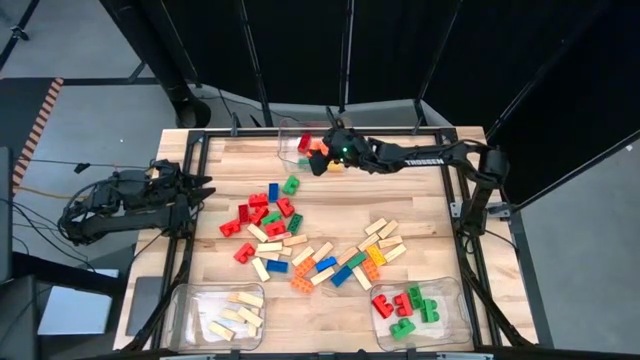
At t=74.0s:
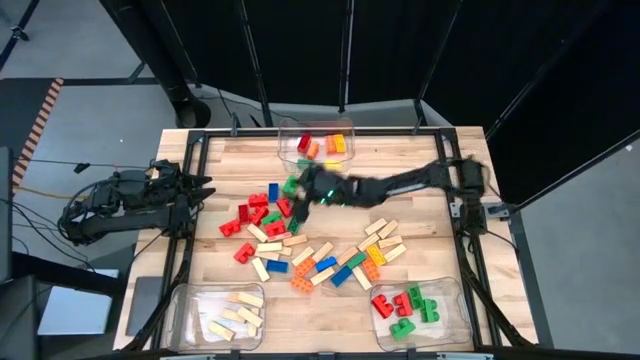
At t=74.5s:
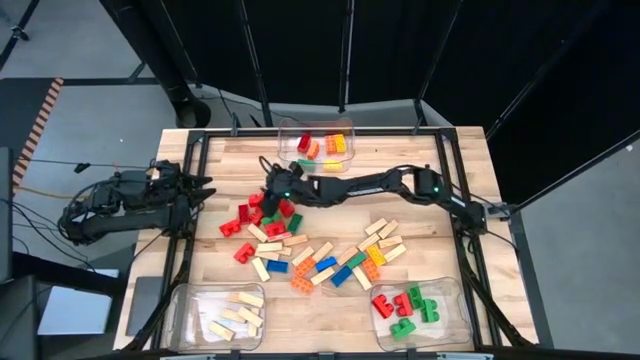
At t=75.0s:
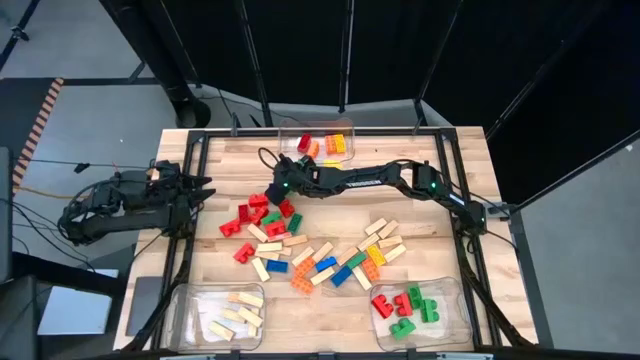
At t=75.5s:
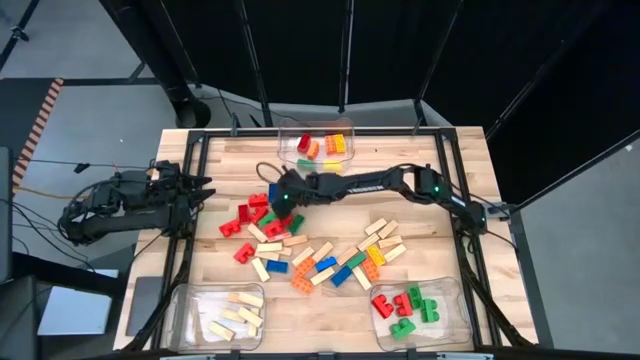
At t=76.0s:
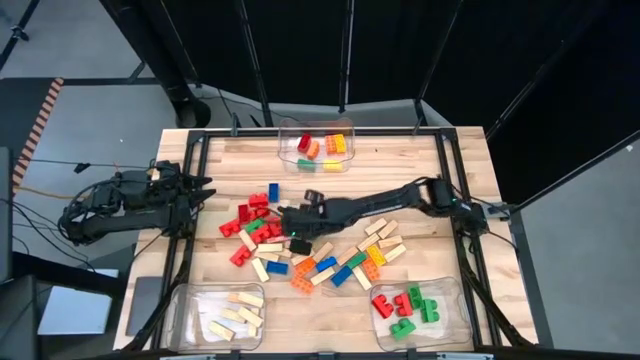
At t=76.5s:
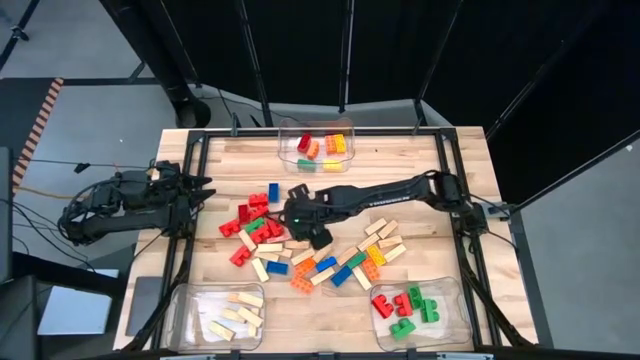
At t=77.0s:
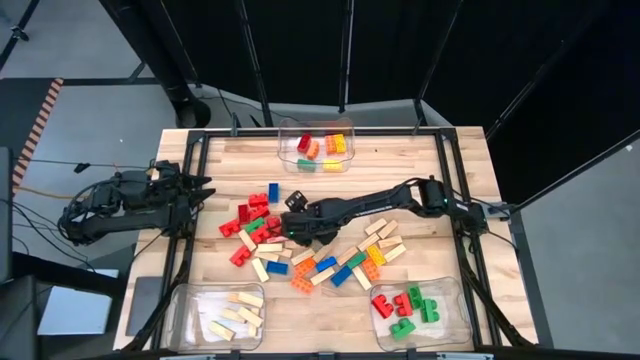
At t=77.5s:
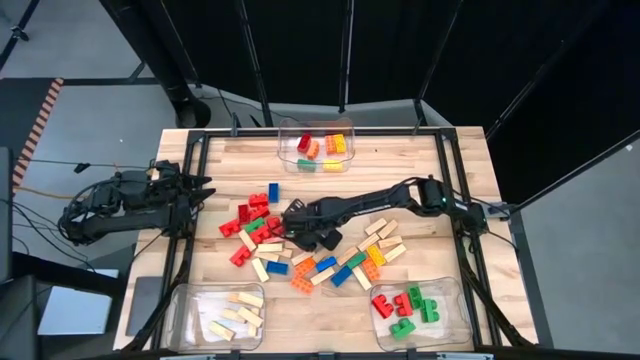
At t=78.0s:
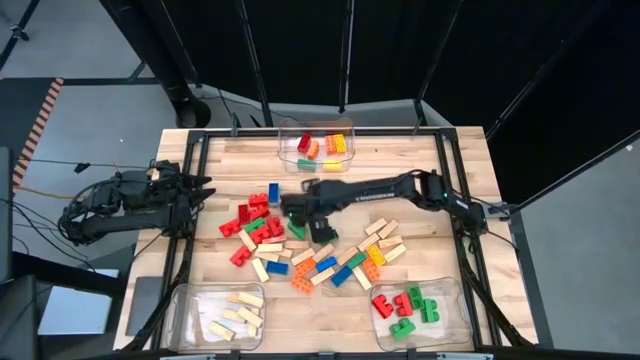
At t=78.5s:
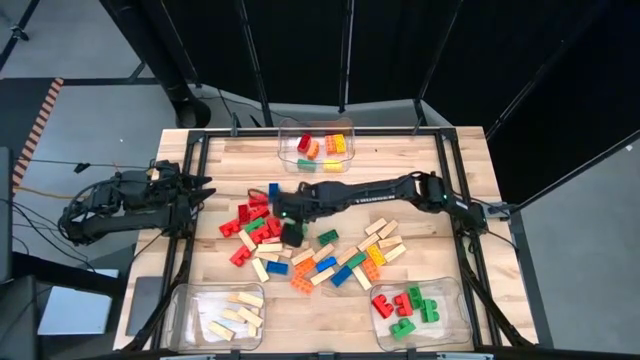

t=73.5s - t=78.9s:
Task: Sort blocks by size
Put the 2-stud green game piece into the bottom right transparent bin

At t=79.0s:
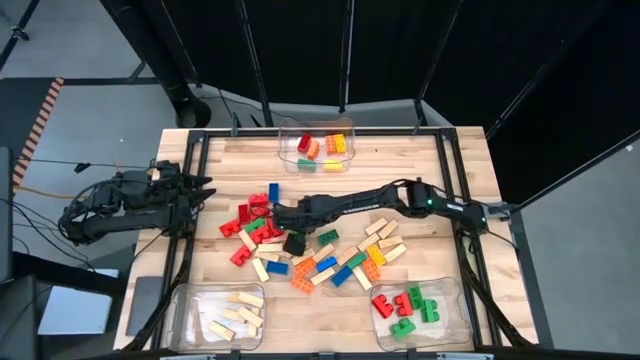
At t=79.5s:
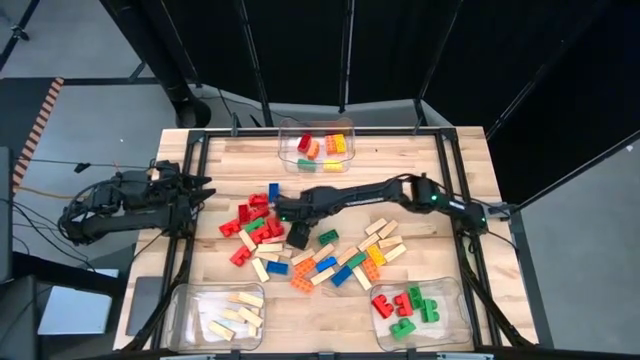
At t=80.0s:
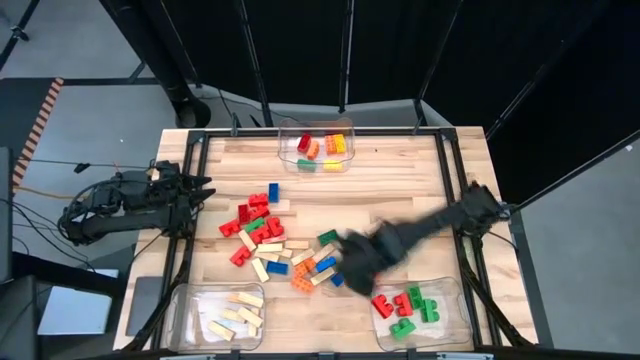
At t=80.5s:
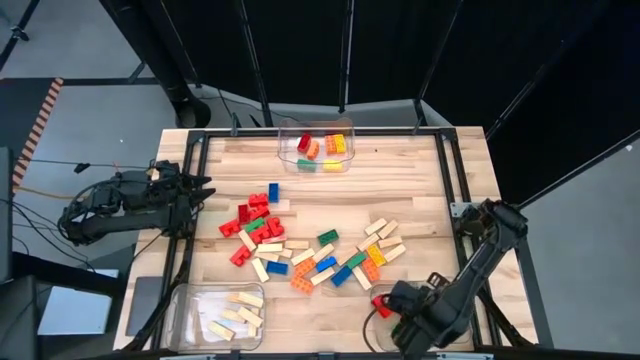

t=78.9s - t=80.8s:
Put the 2-stud green game piece into the bottom right transparent bin

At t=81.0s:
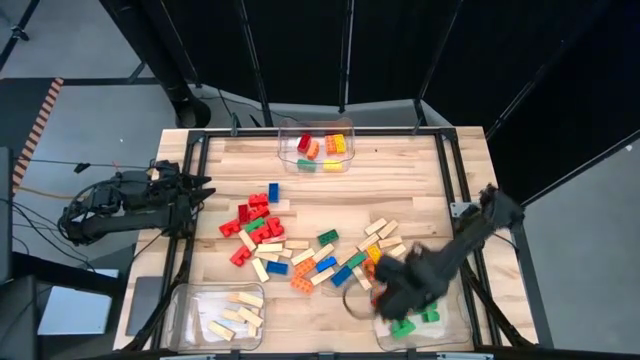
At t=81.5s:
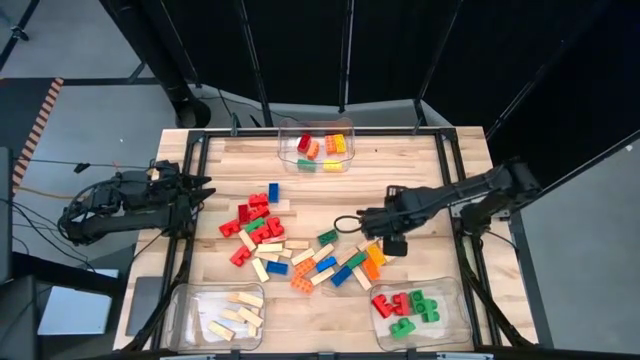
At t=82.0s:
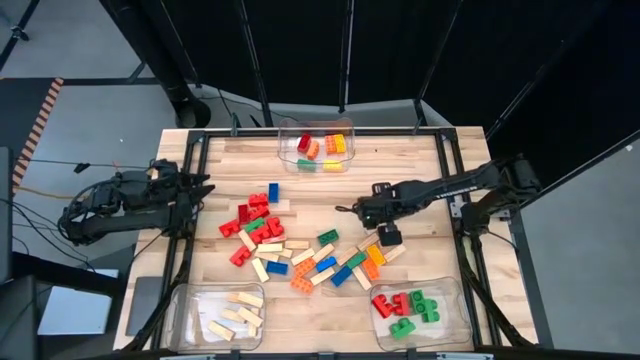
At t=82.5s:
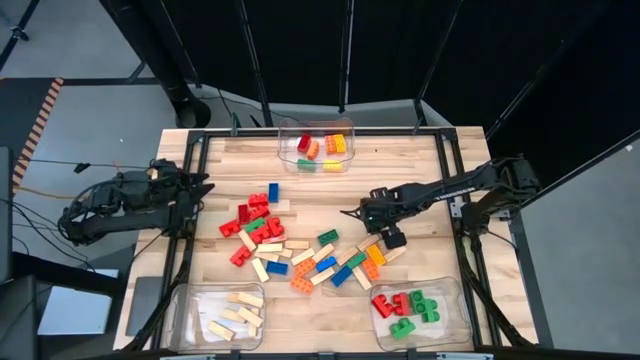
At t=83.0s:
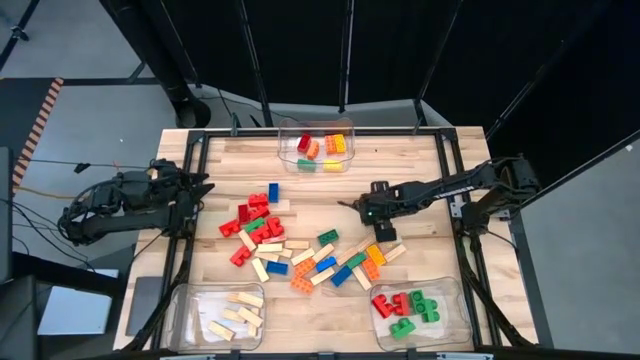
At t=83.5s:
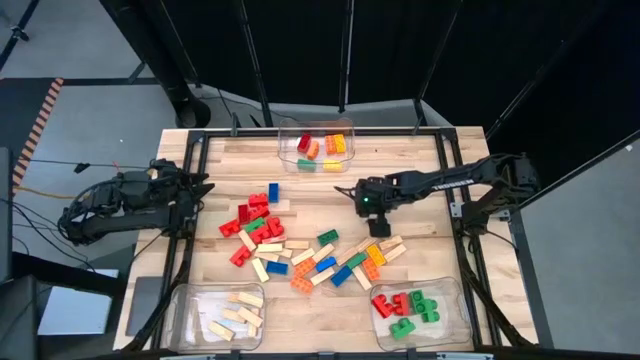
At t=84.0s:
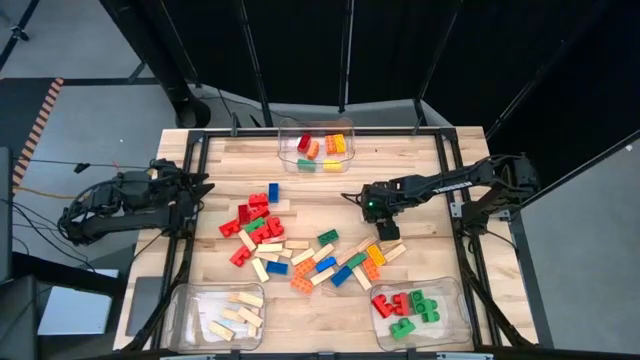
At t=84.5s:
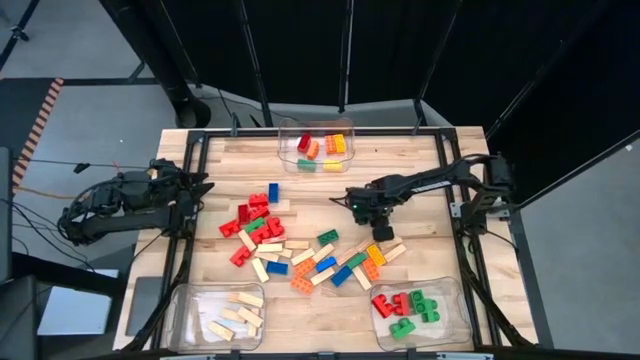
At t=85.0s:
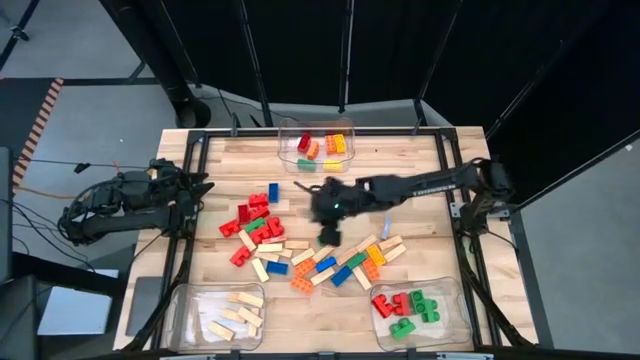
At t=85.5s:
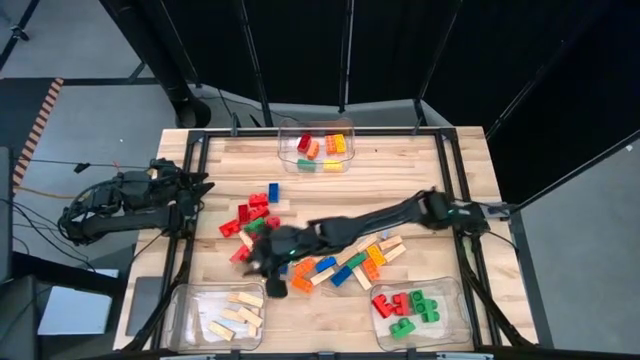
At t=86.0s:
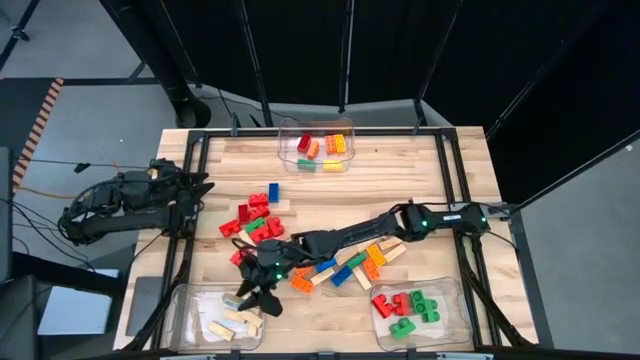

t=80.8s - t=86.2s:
Put the white block into the bottom left transparent bin

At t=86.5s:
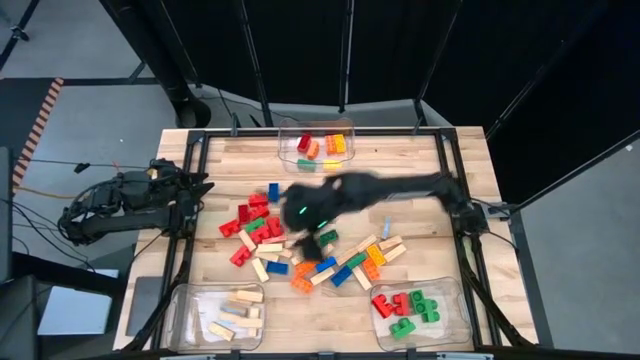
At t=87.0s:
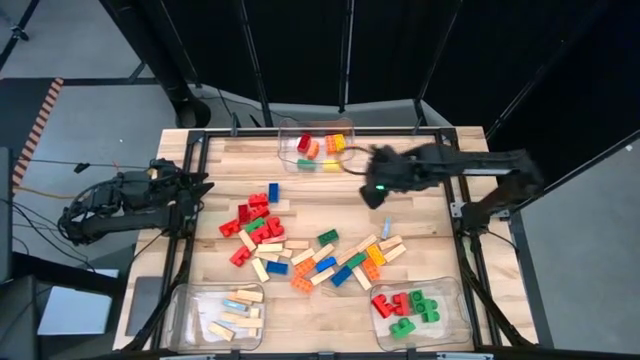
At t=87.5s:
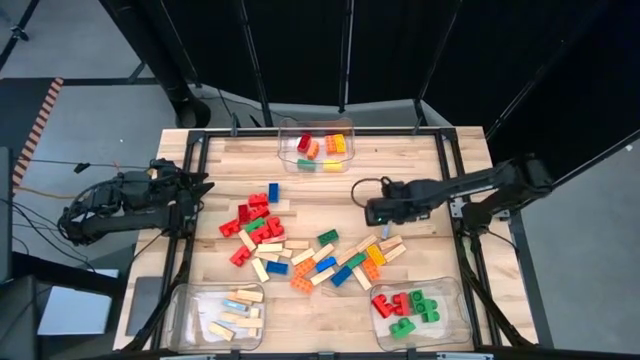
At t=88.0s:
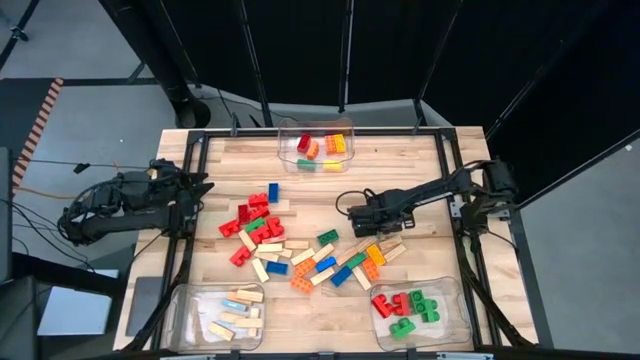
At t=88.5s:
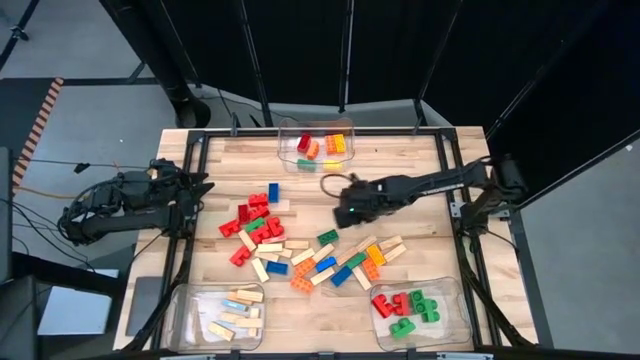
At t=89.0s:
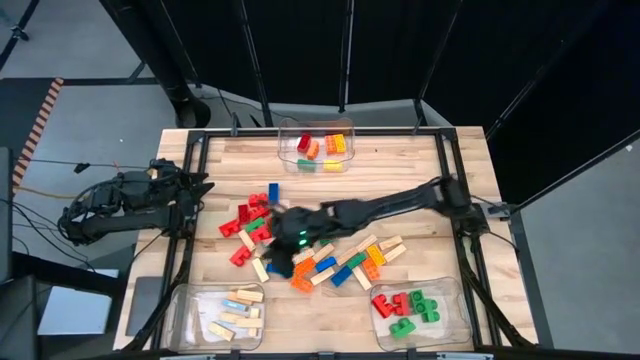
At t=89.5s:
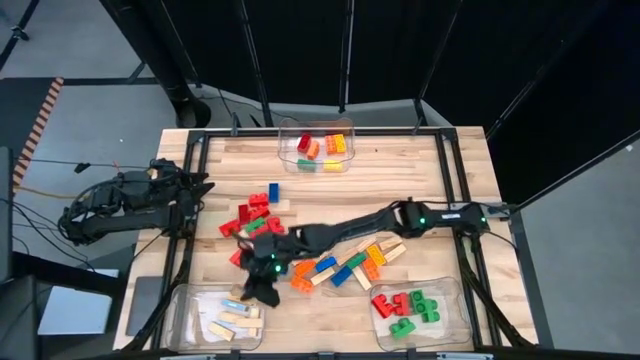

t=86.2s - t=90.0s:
Put the white block into the bottom left transparent bin

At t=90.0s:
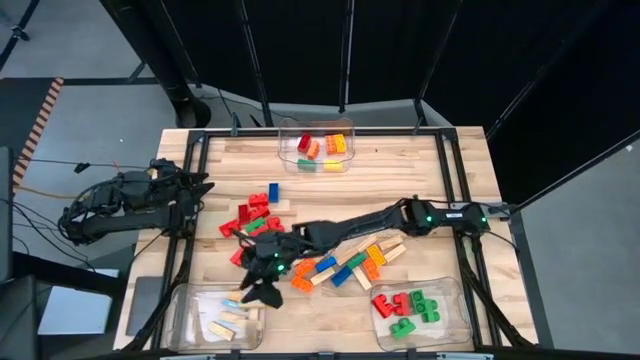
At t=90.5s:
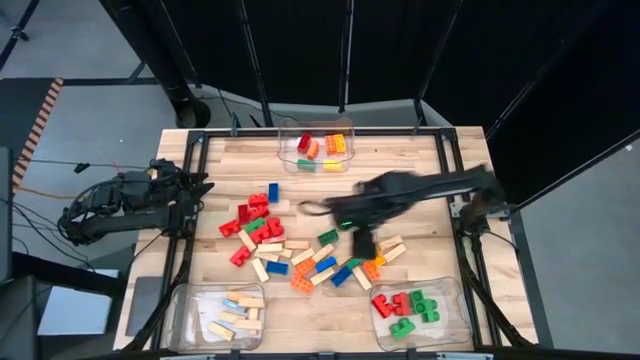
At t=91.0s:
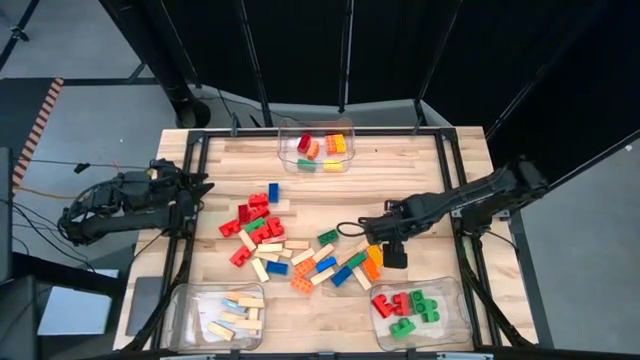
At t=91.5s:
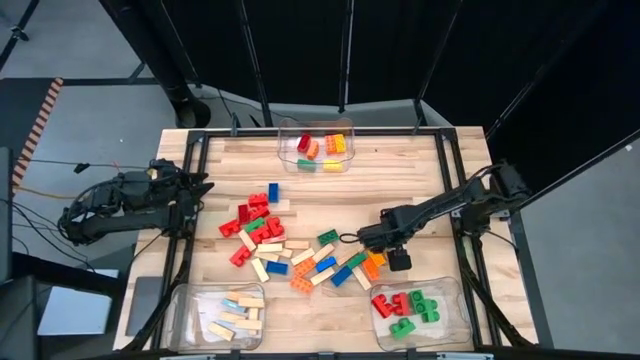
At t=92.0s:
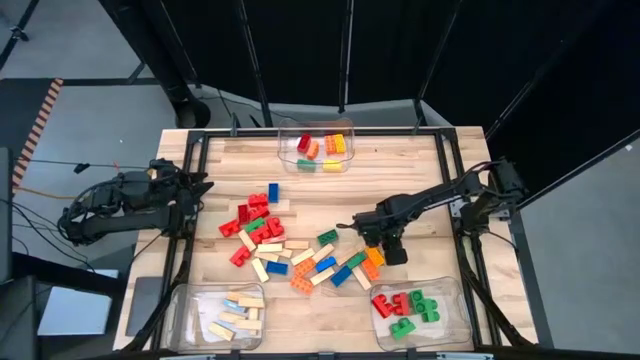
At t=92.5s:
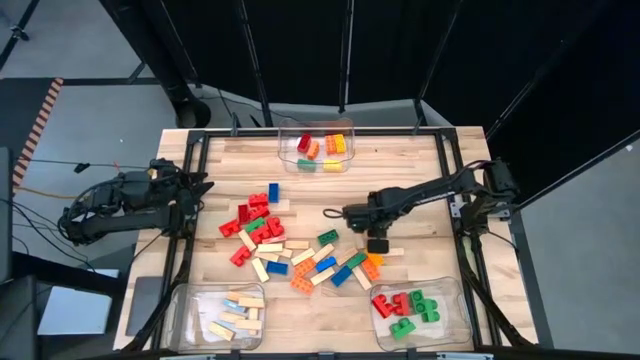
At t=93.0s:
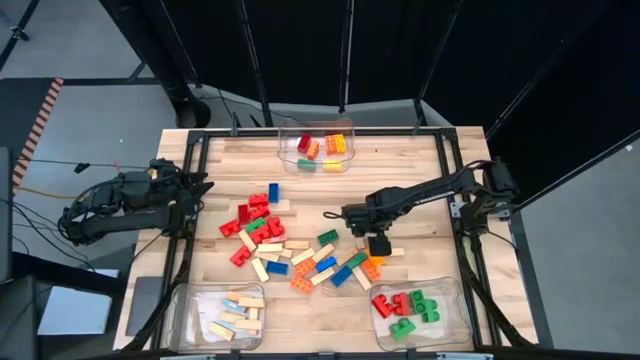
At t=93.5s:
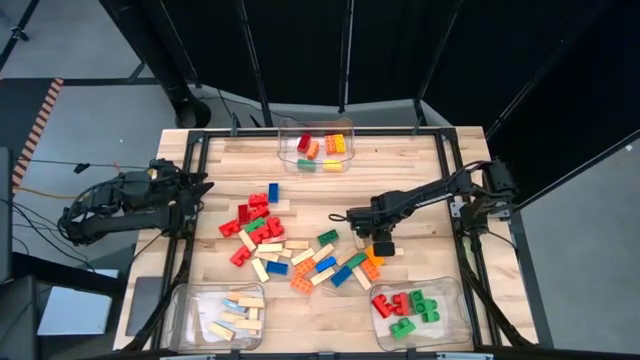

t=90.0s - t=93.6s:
Put the white block into the bottom left transparent bin

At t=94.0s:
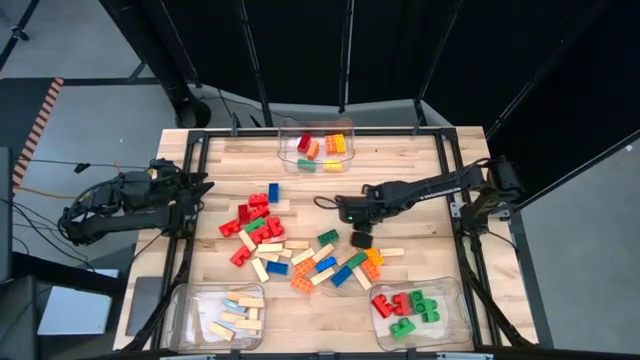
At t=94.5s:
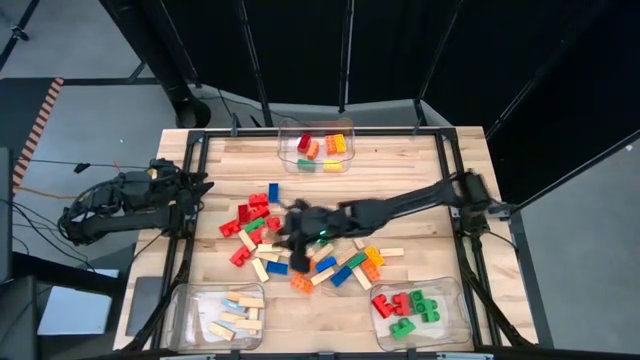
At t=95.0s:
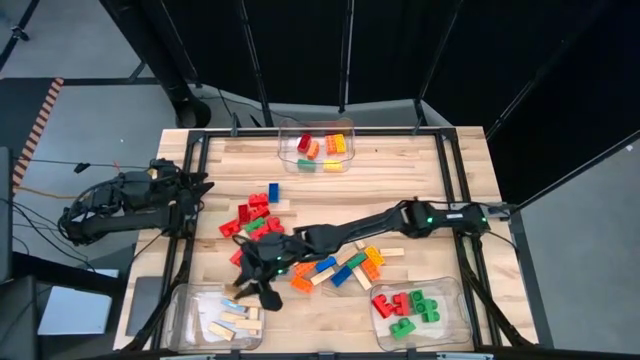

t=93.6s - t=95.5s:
Put the white block into the bottom left transparent bin
